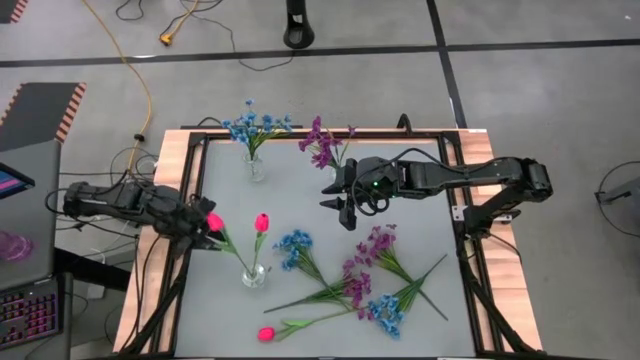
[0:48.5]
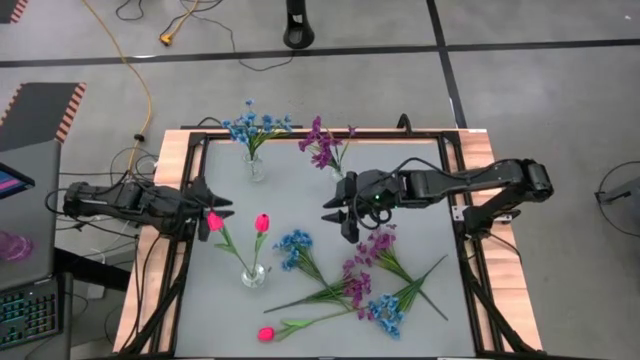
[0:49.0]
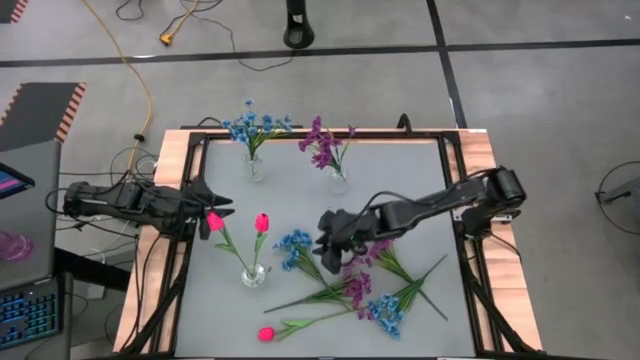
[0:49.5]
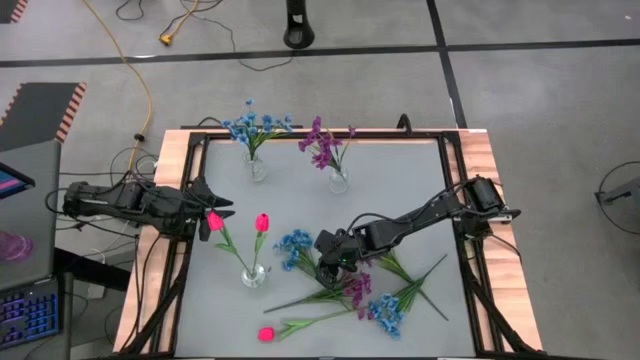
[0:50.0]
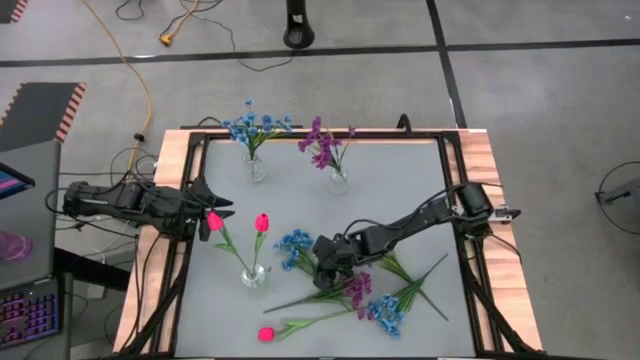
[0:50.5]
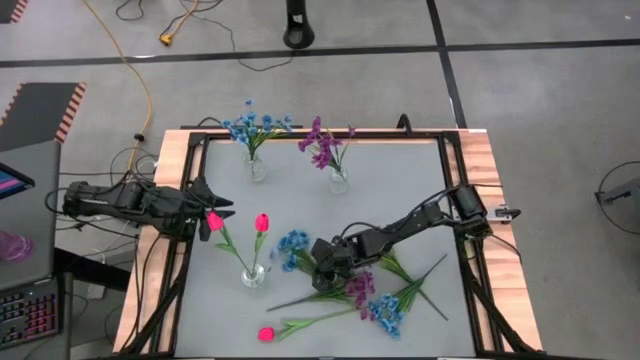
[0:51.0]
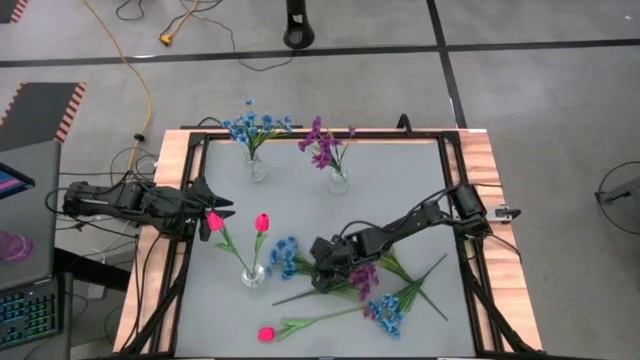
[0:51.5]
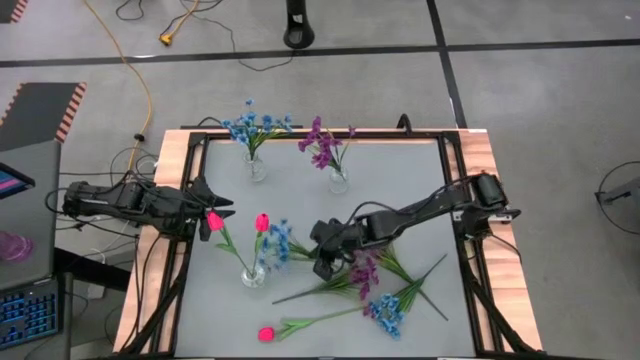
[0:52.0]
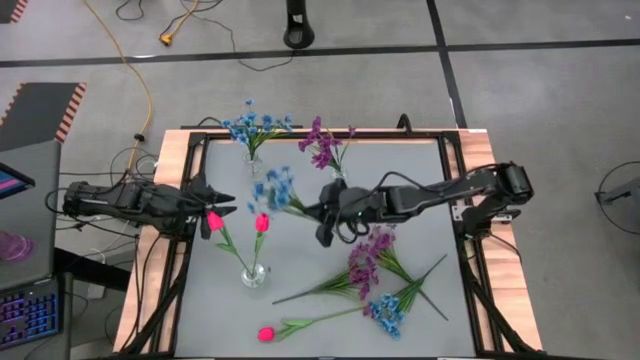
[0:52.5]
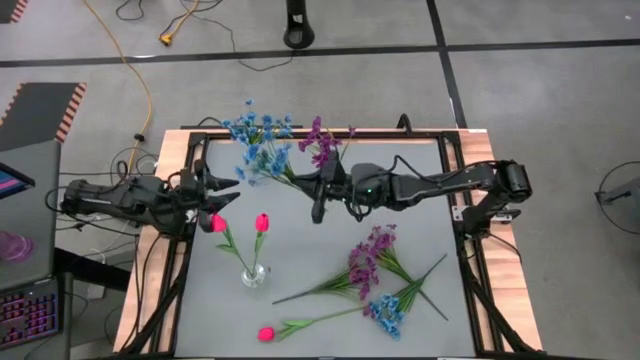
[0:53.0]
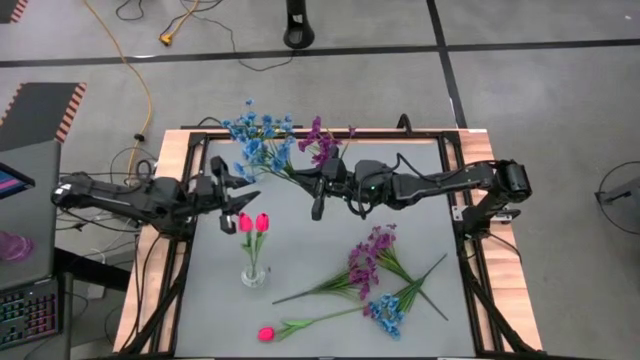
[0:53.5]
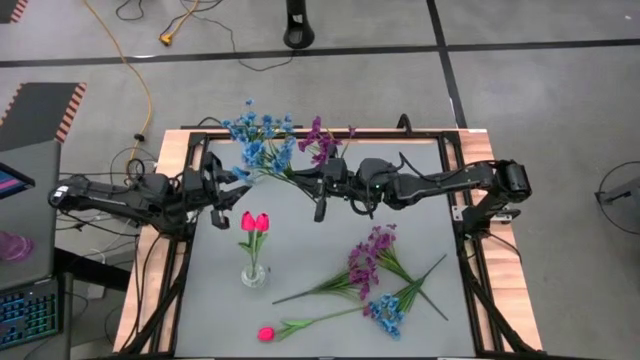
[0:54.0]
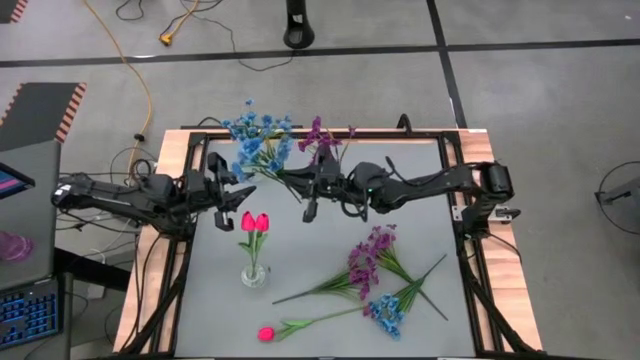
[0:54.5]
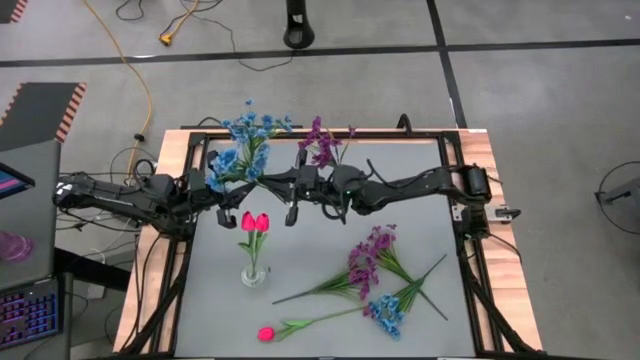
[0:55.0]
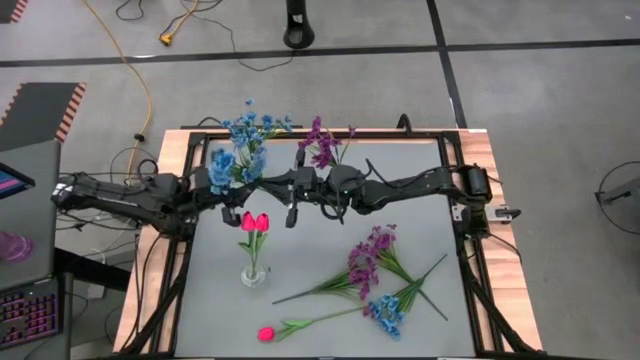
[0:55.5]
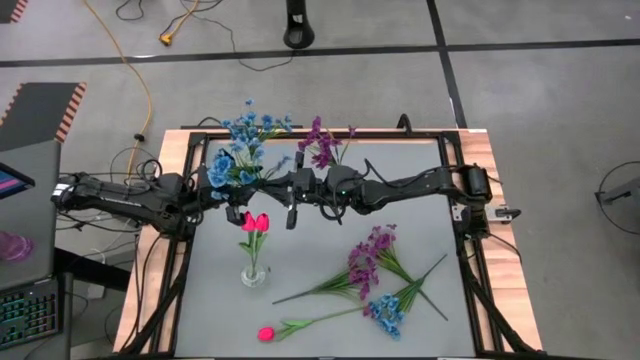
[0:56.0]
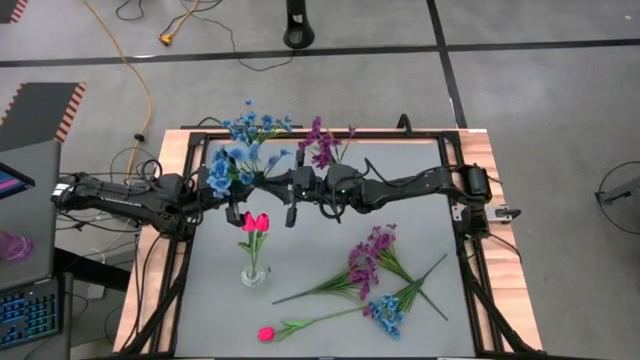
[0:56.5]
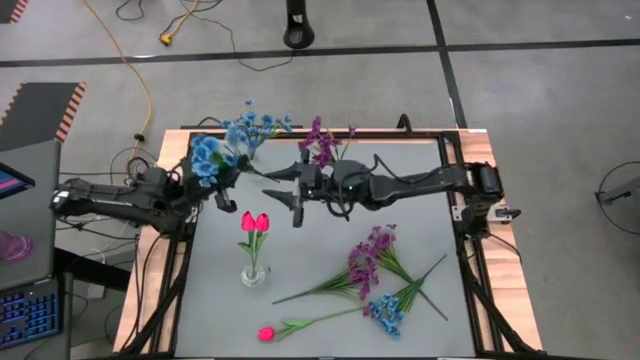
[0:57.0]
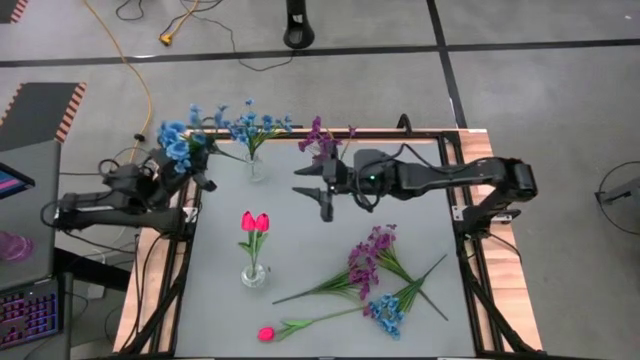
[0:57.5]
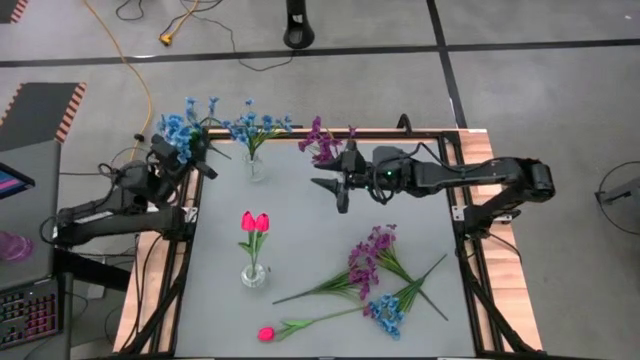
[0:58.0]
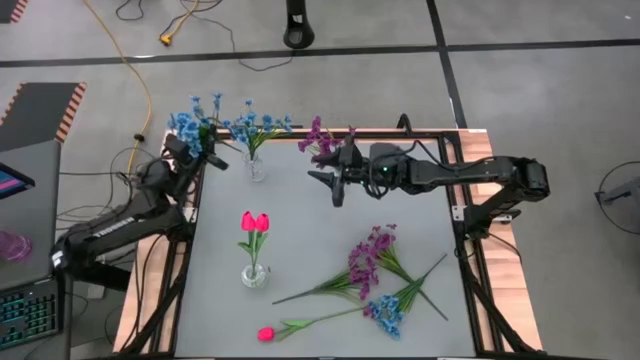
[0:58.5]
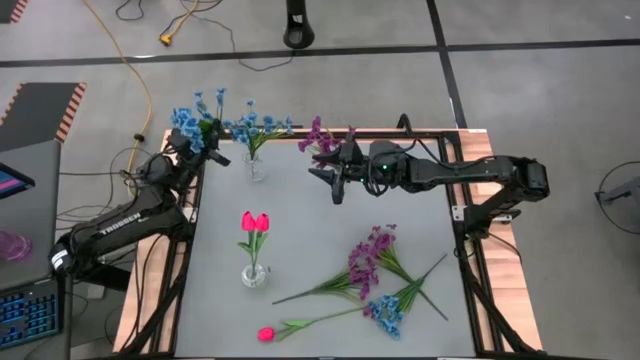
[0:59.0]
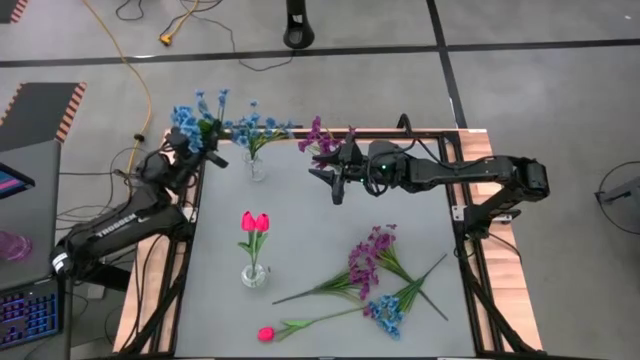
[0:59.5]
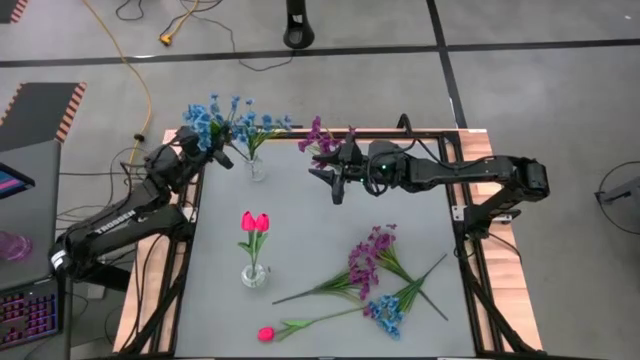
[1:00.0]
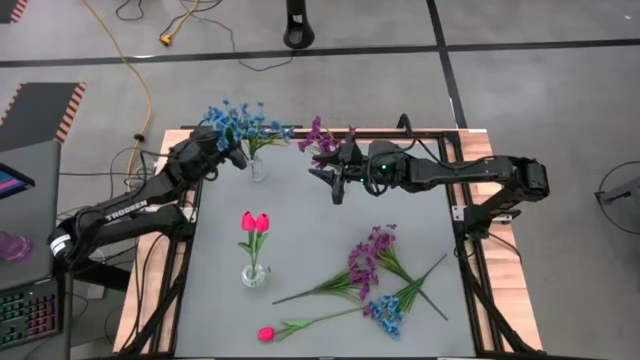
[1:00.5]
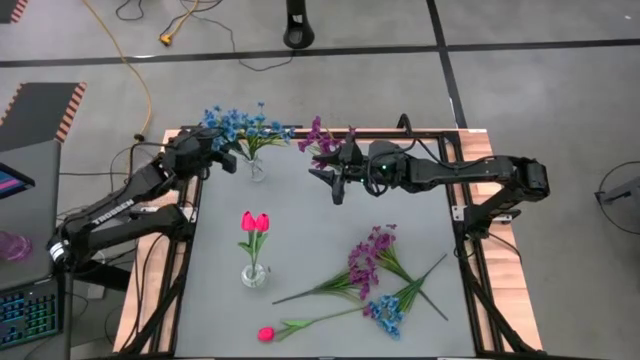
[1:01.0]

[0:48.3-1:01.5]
Task: Sort flowers into vase by color
Put the left blue flower into the top left transparent vase

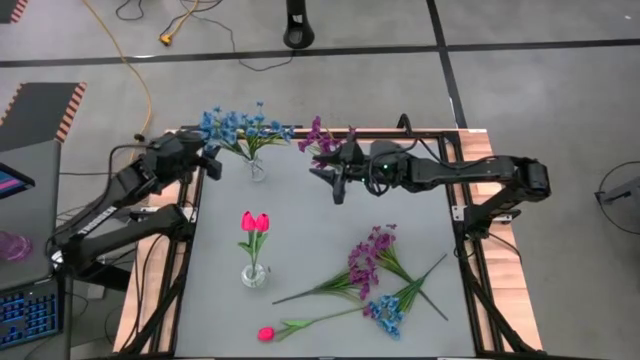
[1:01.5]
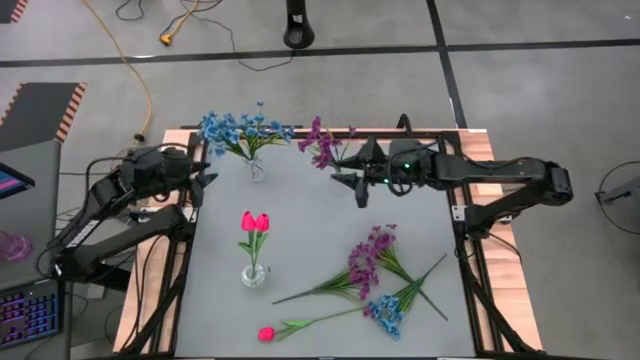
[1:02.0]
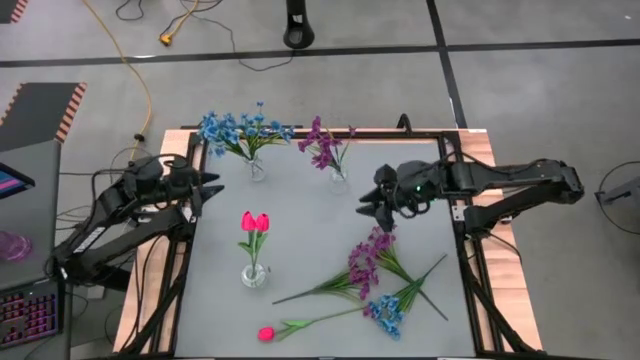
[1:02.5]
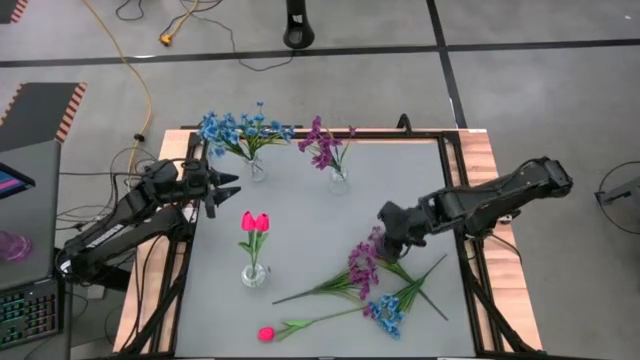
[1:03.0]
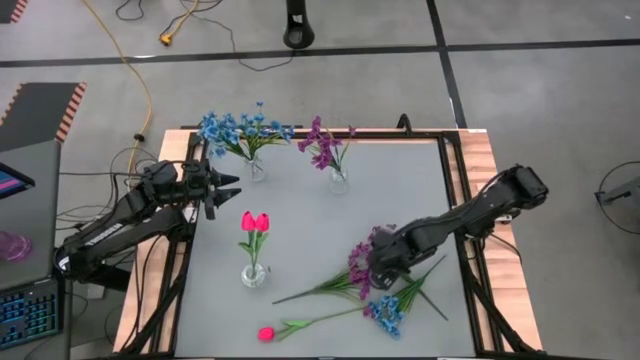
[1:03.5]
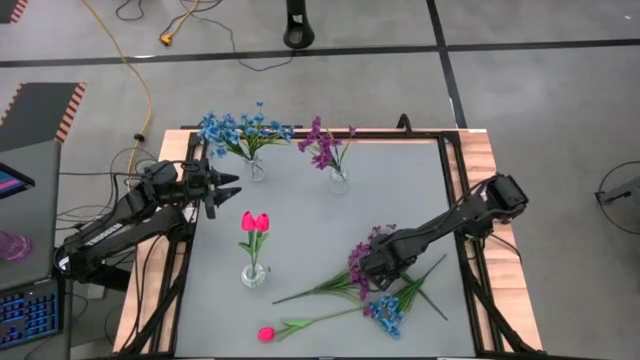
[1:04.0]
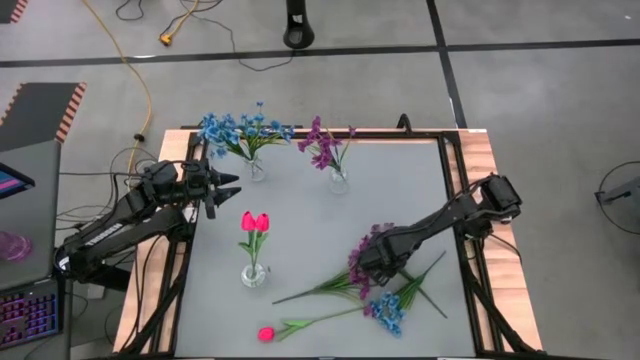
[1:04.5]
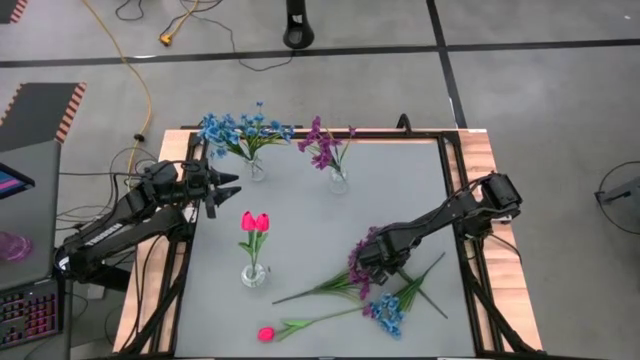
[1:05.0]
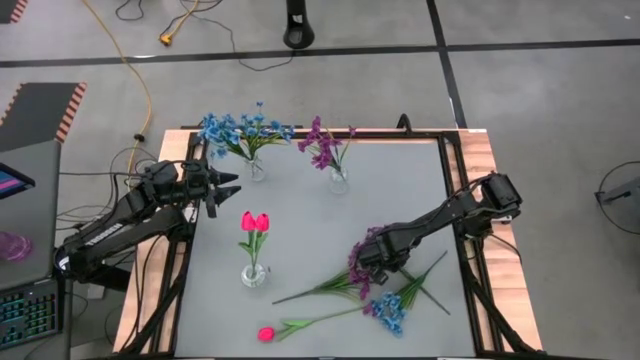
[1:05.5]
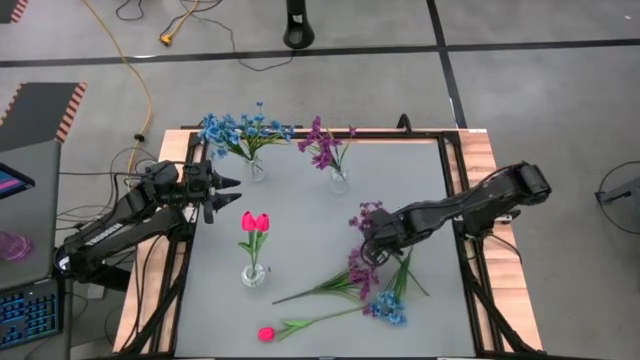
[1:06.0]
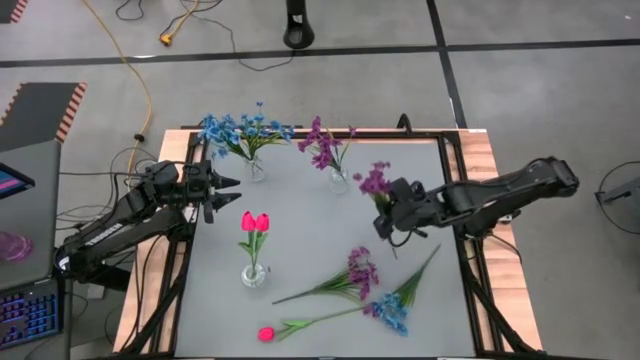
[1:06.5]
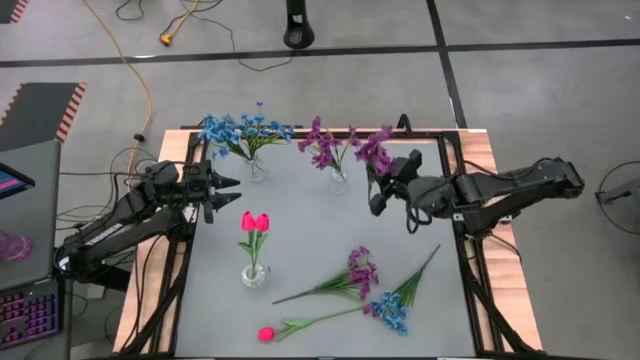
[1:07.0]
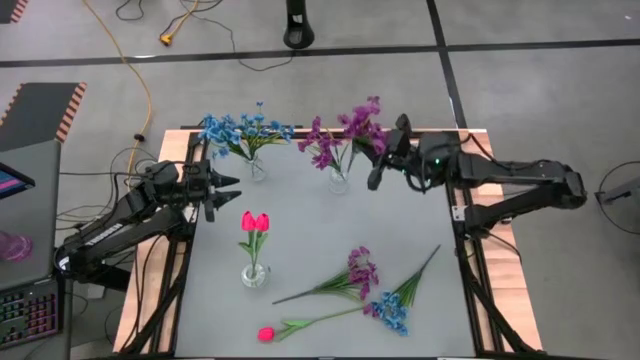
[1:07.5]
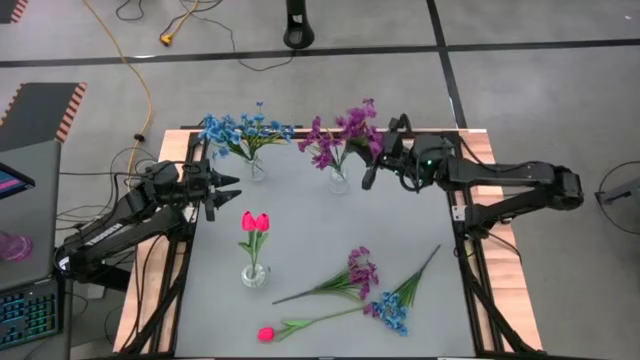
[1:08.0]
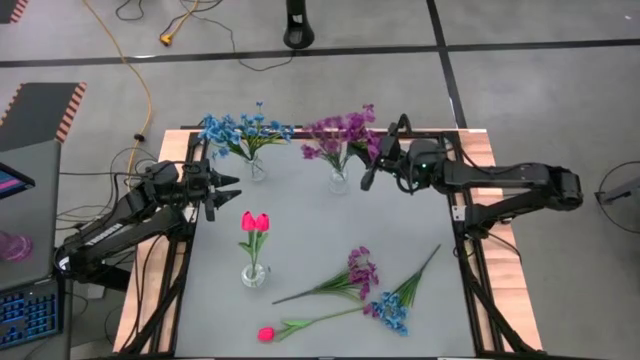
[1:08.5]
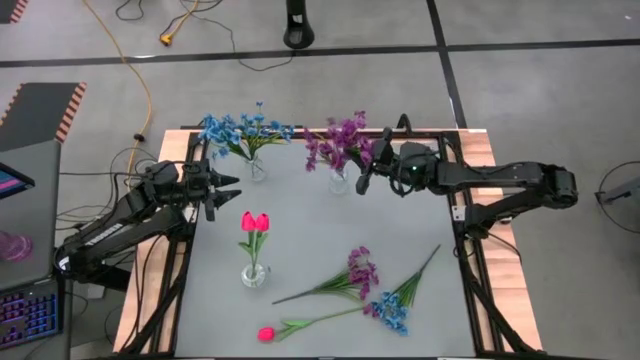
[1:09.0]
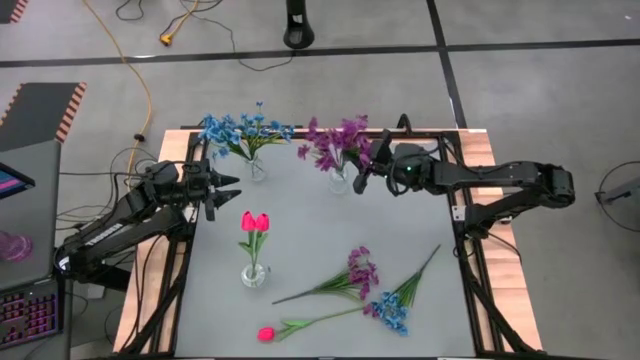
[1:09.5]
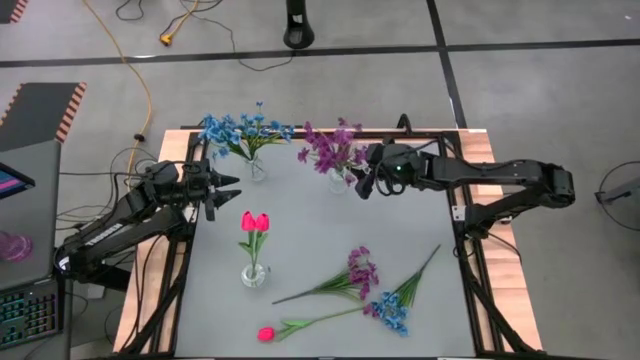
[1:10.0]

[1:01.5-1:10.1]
Put the right violet flower into the top right transparent vase
